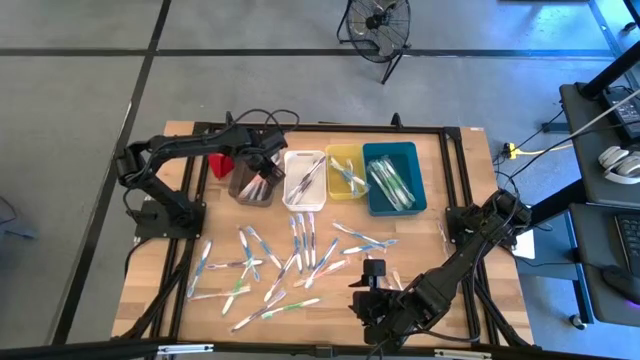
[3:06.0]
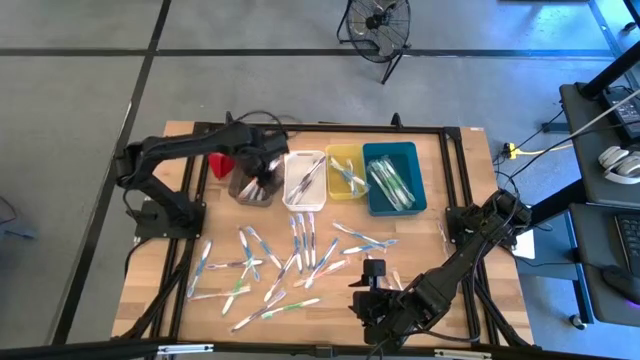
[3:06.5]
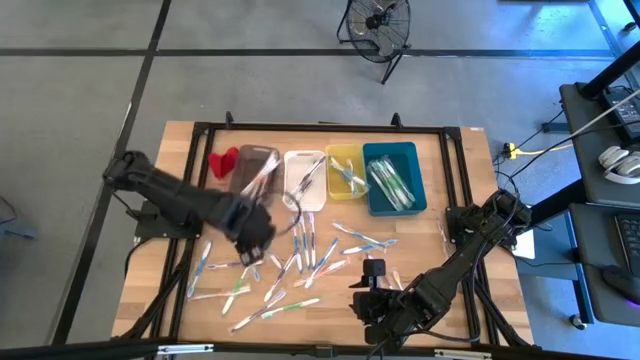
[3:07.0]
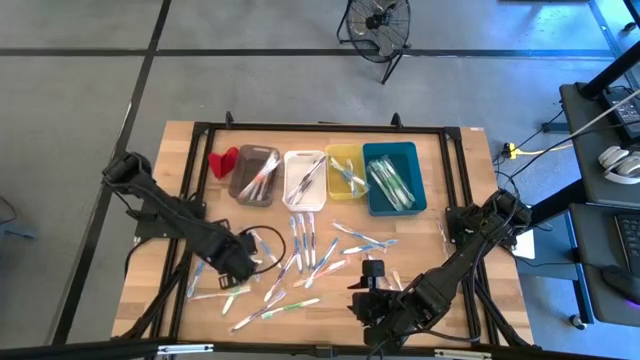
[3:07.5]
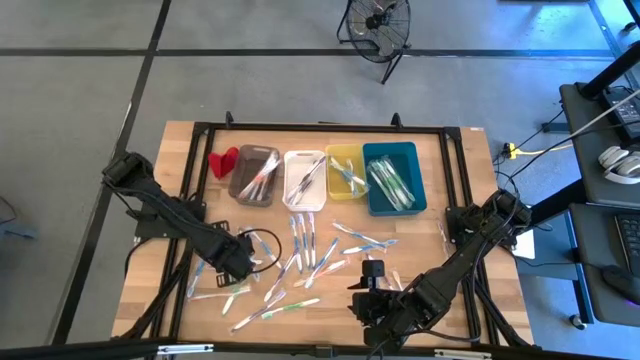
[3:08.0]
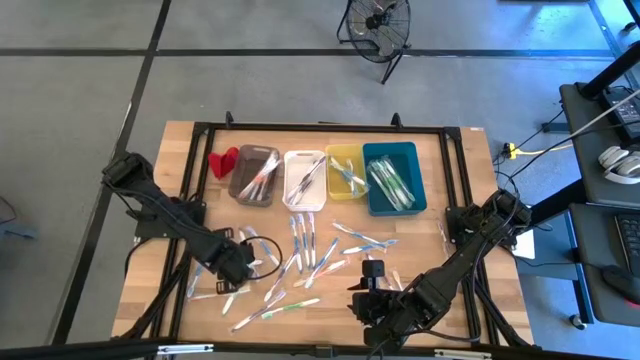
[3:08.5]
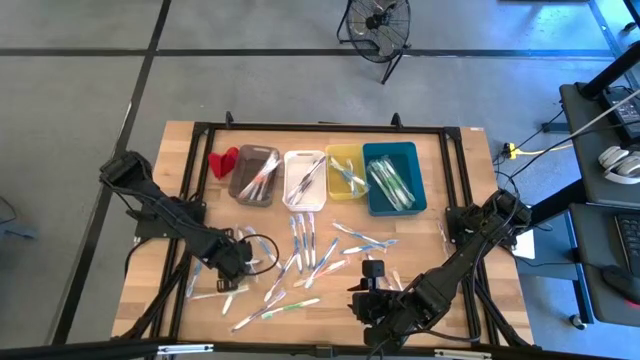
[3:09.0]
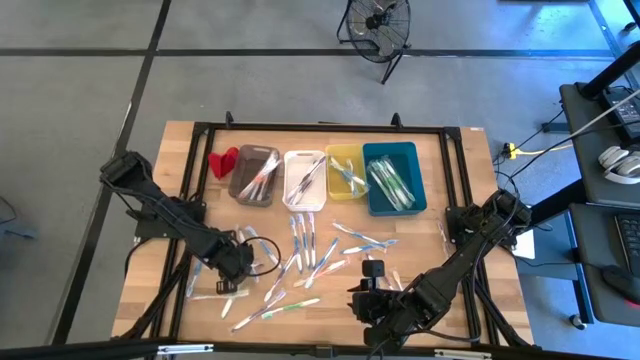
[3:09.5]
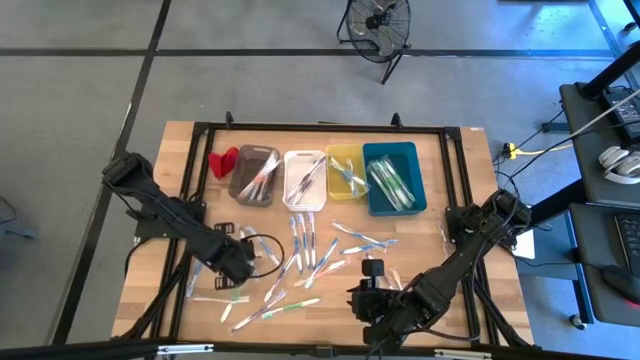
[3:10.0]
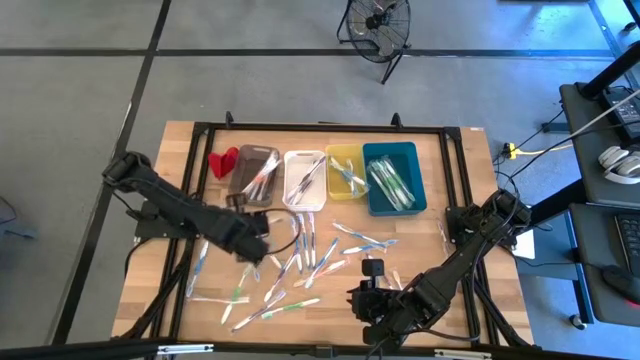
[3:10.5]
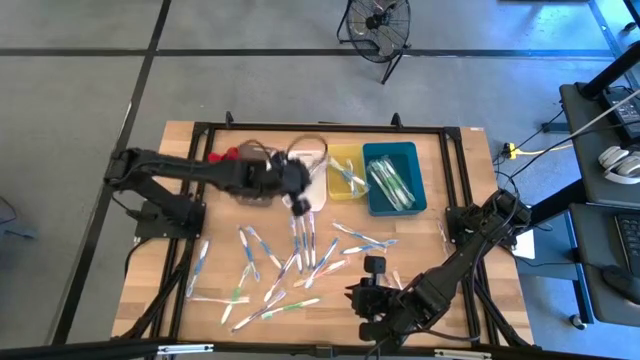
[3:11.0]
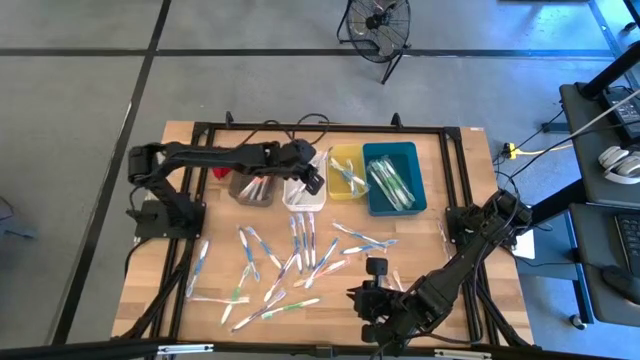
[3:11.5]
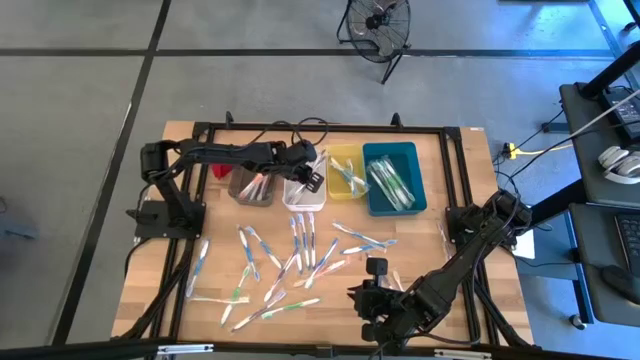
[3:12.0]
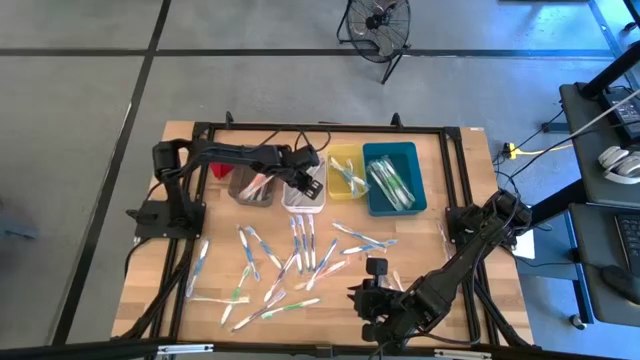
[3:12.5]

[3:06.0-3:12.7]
Task: Pick & Place Toothbrushes
Put the purple toothbrush into the white bin

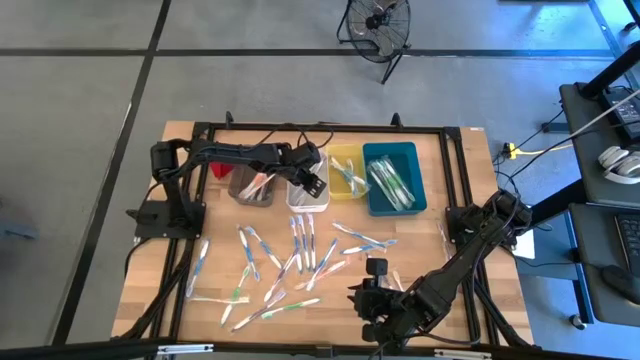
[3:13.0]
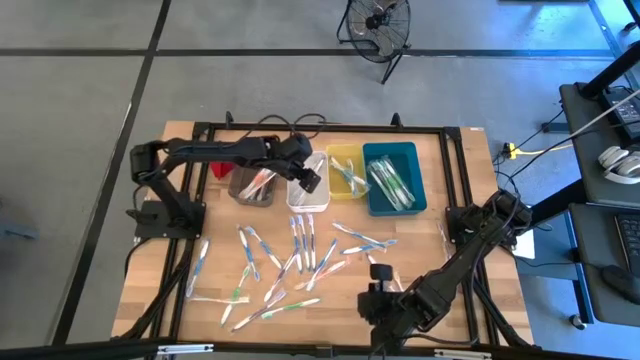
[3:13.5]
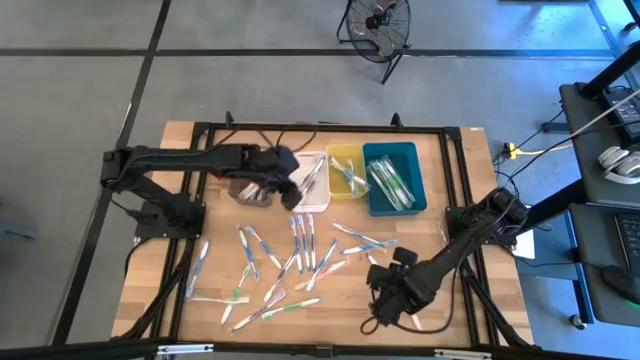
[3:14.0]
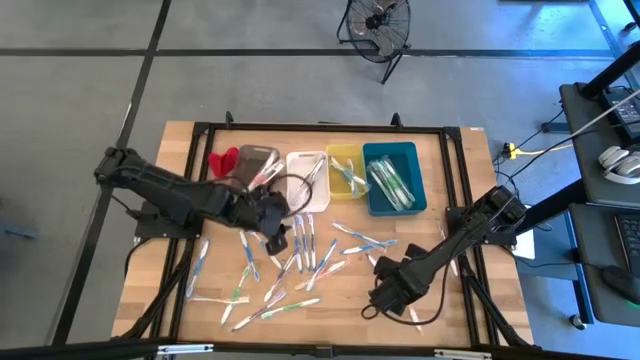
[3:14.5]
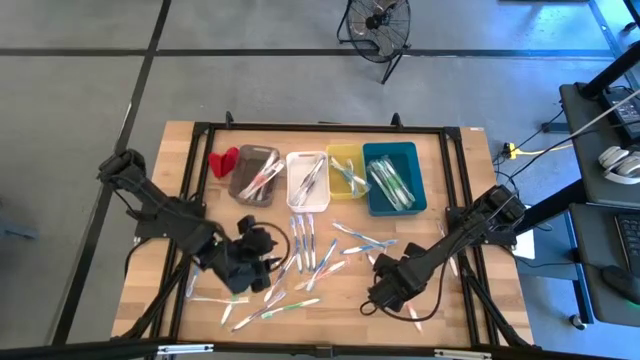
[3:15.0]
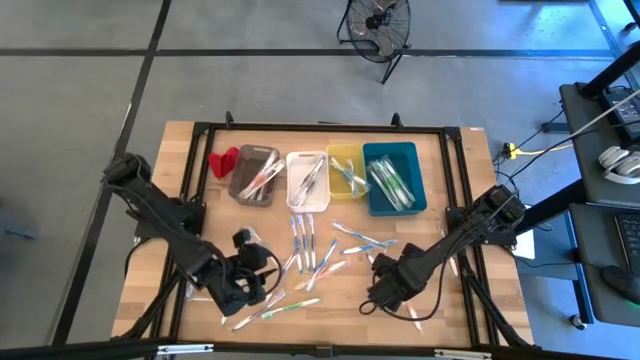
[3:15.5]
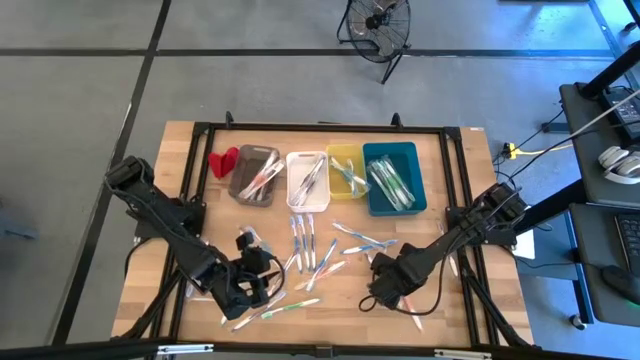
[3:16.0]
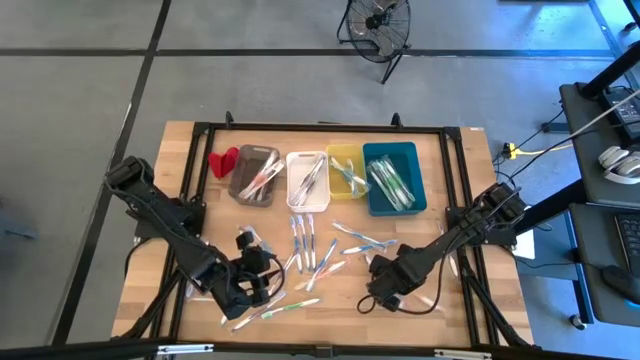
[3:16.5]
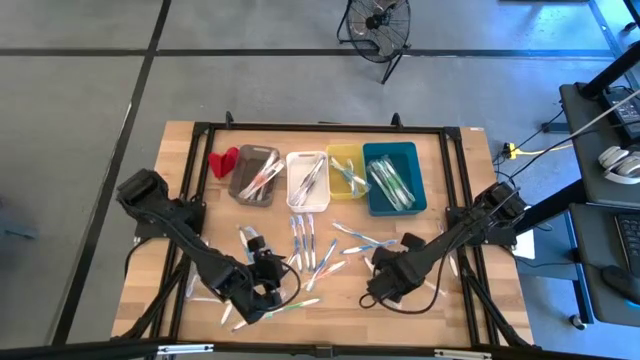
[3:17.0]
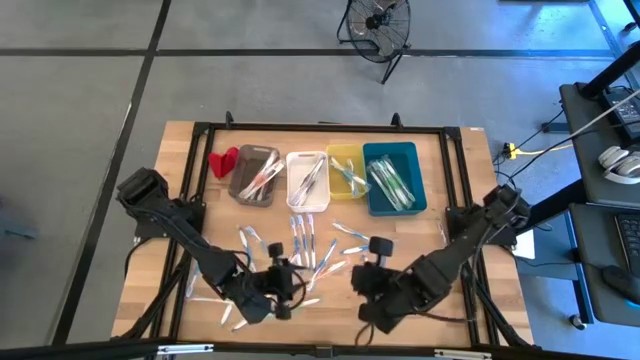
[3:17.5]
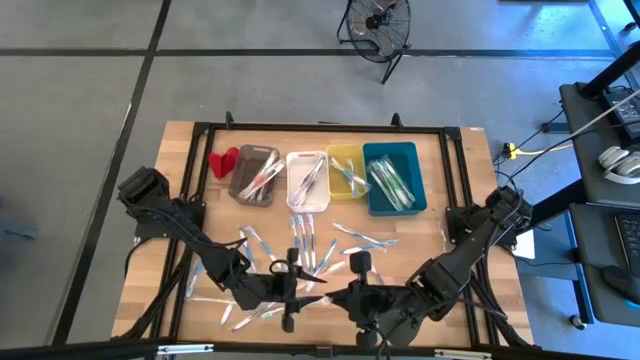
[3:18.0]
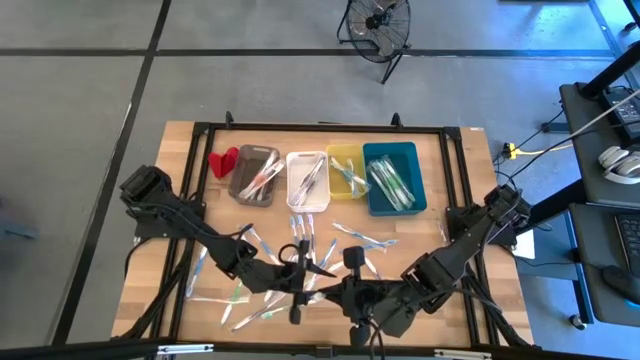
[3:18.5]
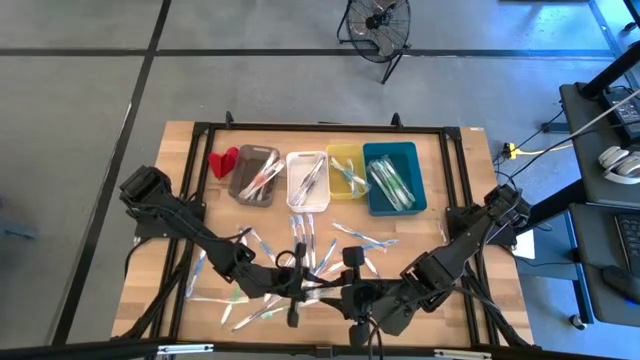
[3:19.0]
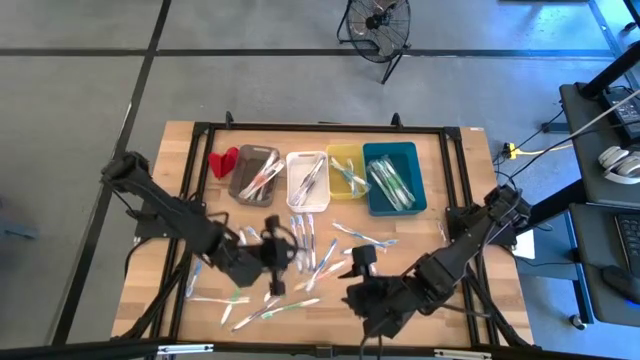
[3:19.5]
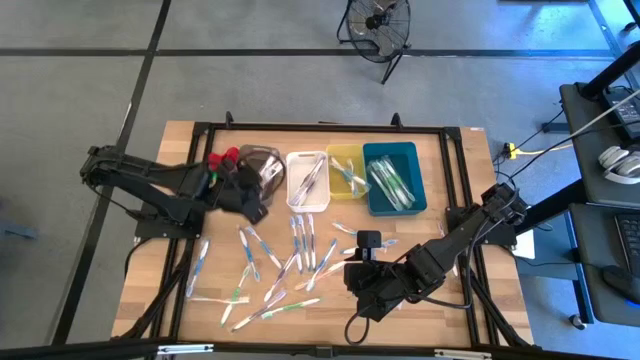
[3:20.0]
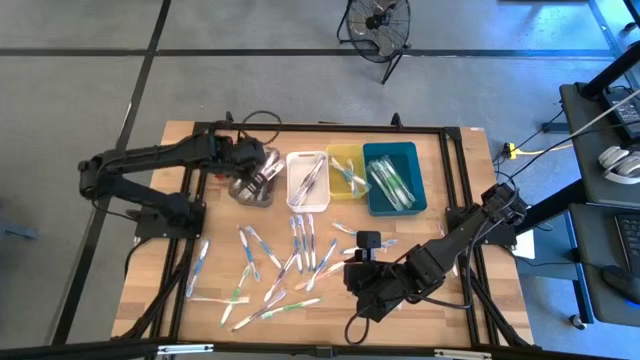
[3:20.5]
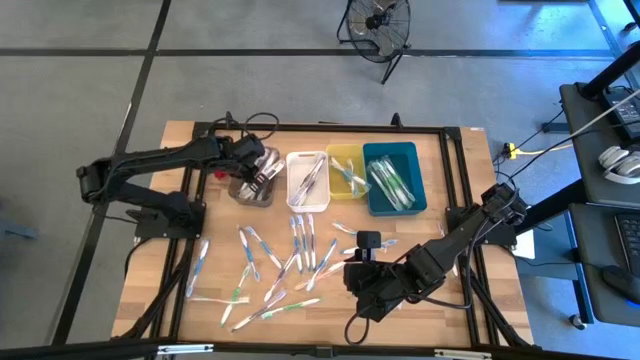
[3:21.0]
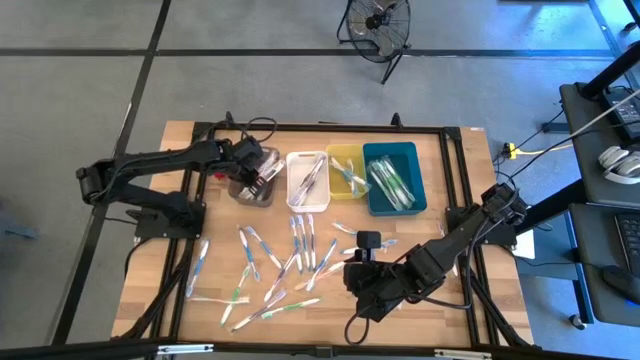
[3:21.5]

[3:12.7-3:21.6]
Put the right orange toothbrush into the black bin

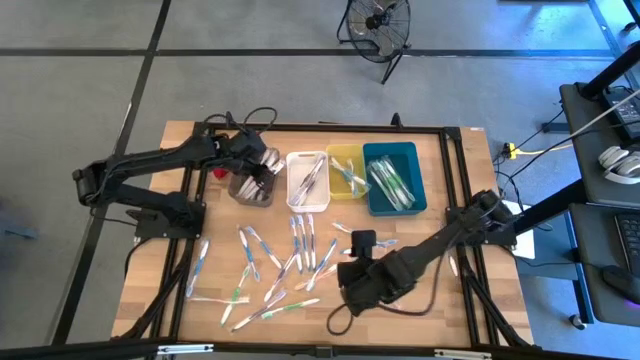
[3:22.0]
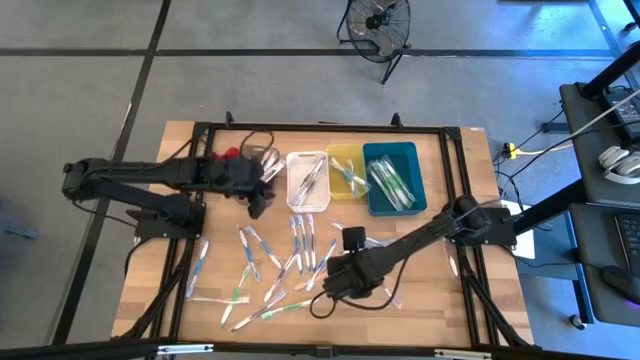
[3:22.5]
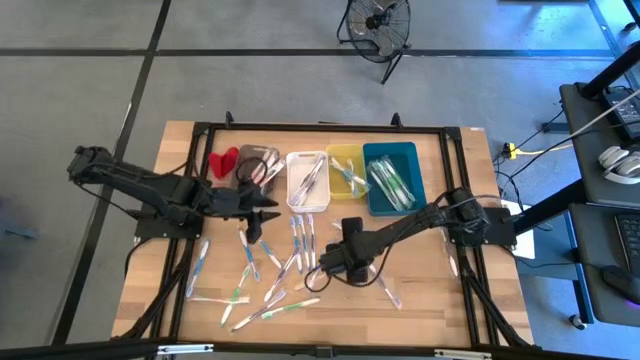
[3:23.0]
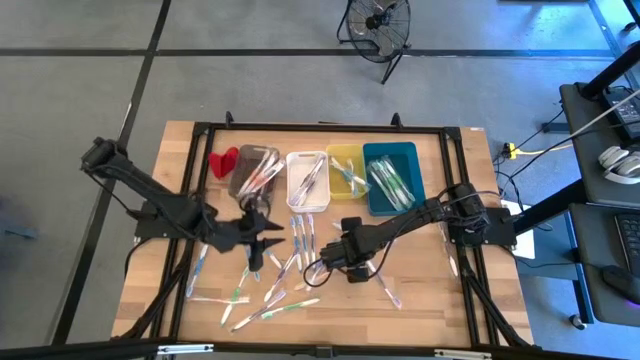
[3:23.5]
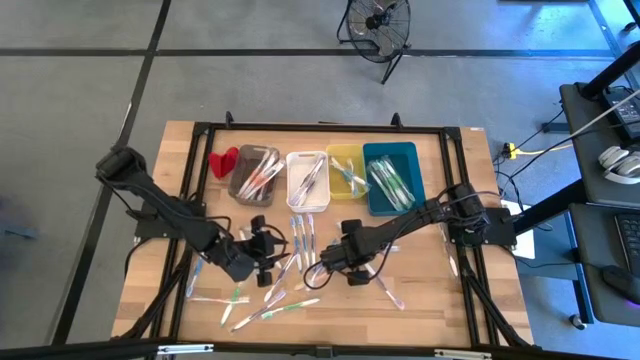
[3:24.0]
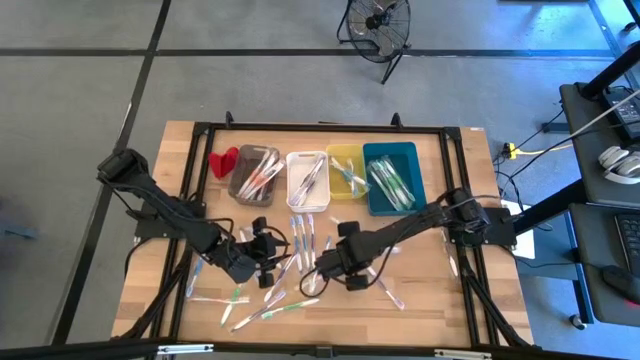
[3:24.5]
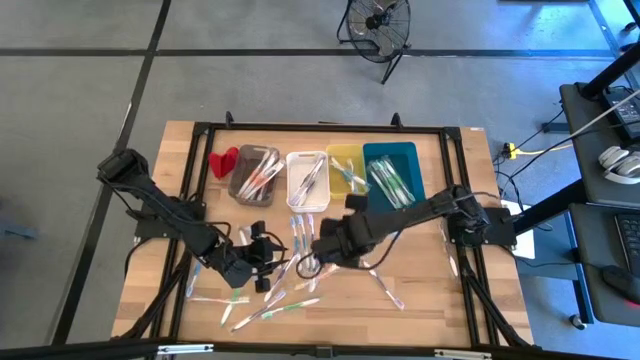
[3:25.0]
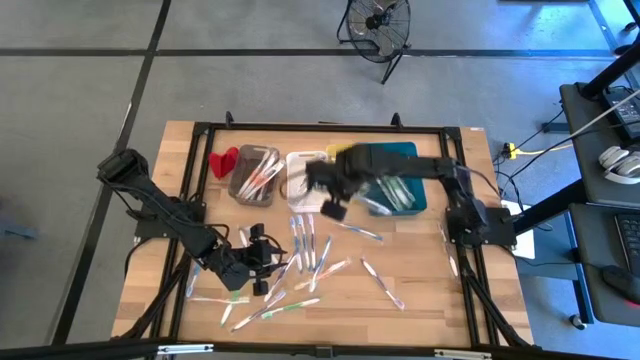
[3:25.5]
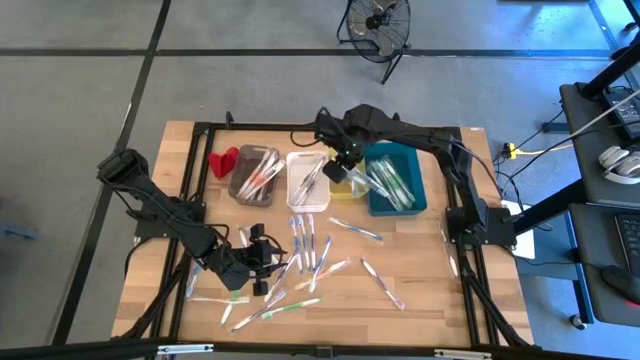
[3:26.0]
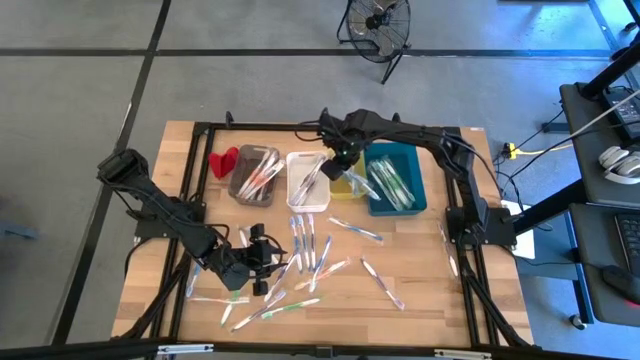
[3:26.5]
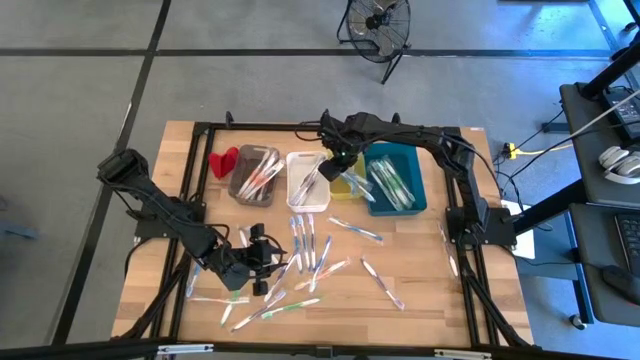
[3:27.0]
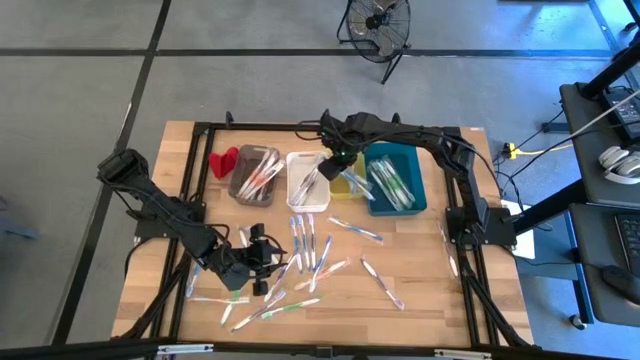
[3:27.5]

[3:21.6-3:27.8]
Put the blue toothbrush into the yellow bin
